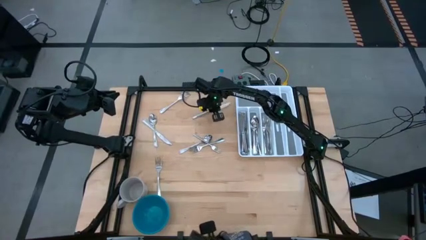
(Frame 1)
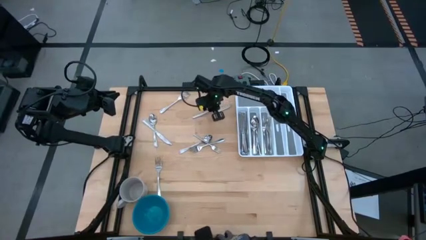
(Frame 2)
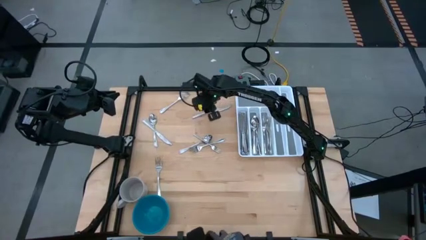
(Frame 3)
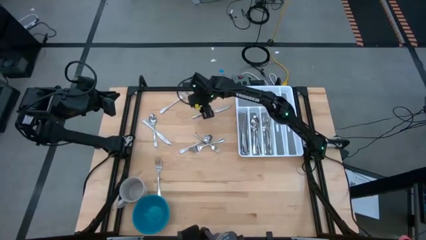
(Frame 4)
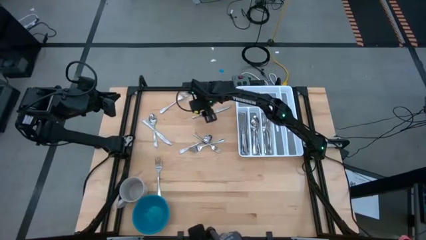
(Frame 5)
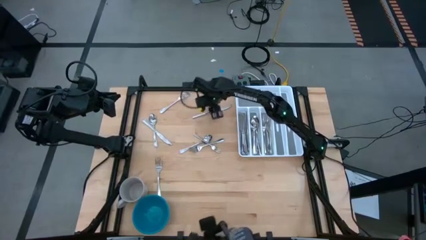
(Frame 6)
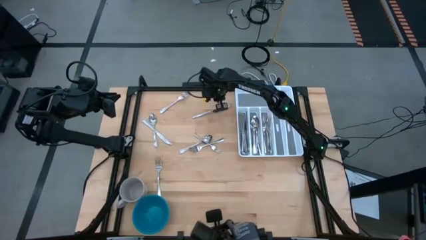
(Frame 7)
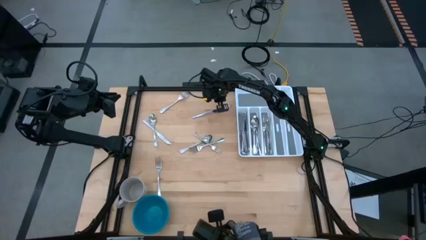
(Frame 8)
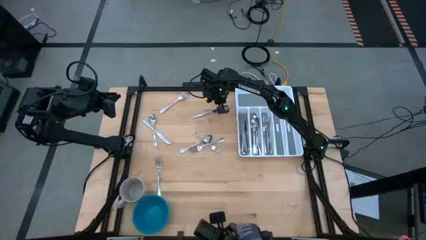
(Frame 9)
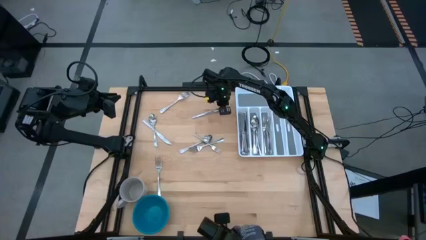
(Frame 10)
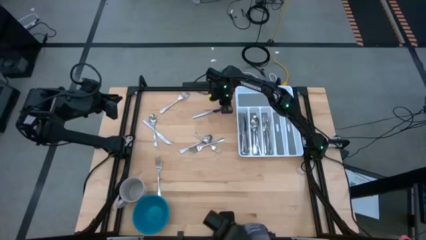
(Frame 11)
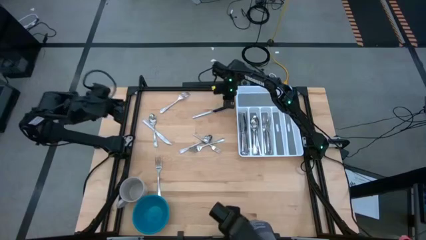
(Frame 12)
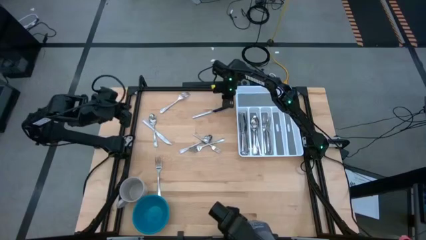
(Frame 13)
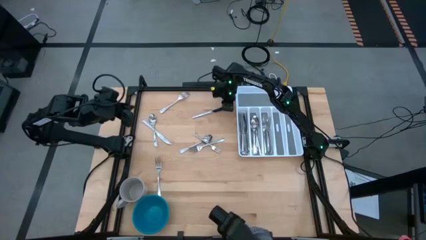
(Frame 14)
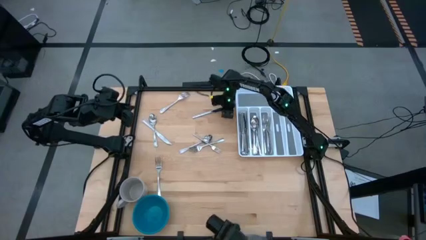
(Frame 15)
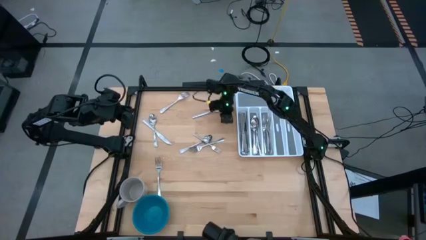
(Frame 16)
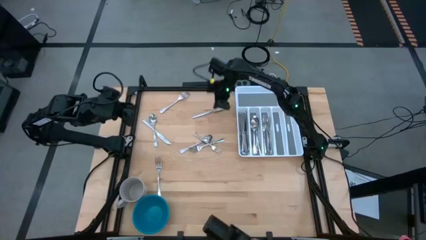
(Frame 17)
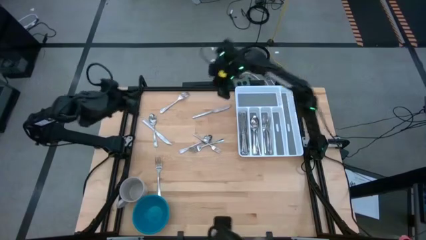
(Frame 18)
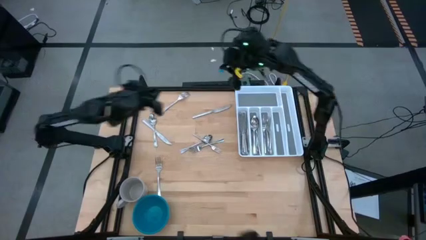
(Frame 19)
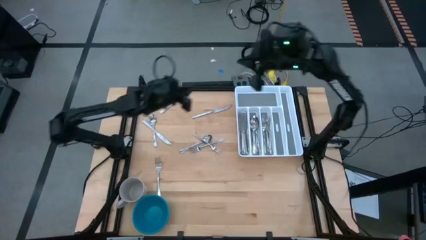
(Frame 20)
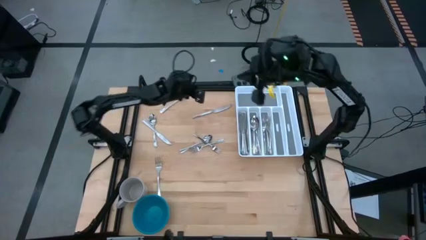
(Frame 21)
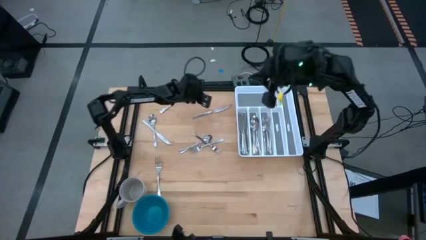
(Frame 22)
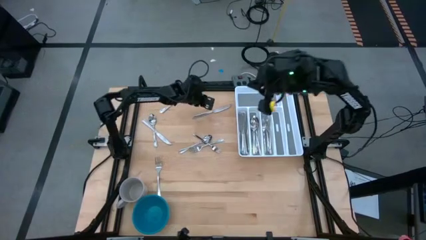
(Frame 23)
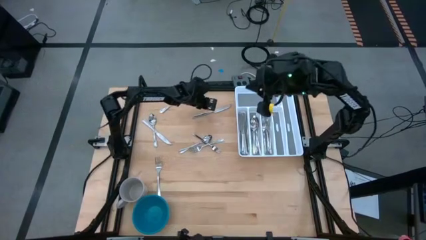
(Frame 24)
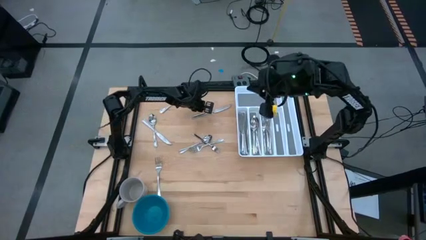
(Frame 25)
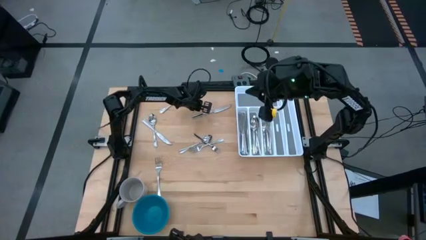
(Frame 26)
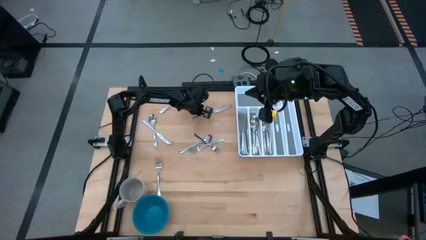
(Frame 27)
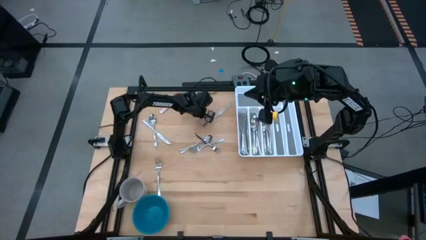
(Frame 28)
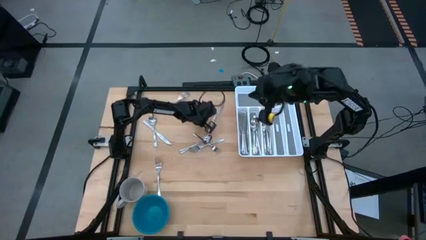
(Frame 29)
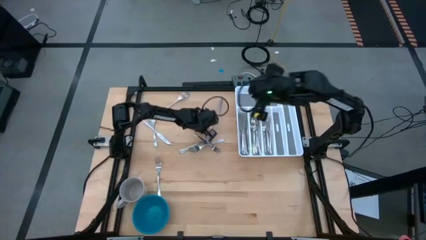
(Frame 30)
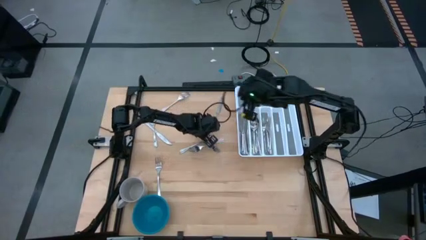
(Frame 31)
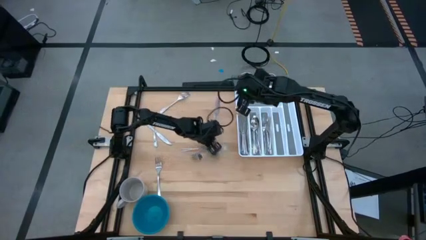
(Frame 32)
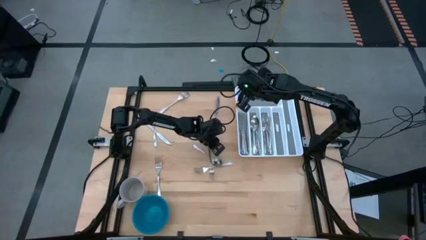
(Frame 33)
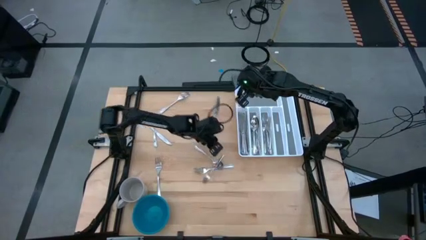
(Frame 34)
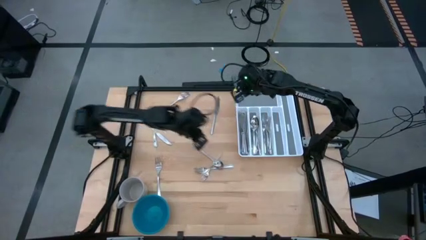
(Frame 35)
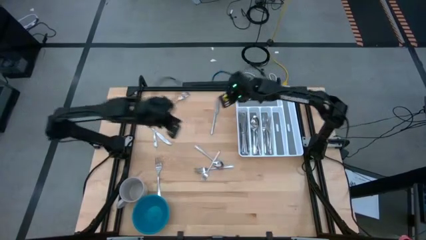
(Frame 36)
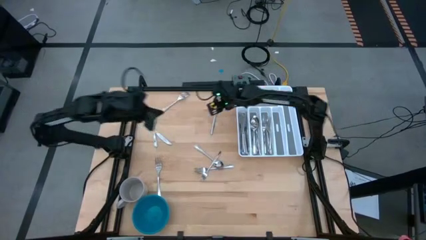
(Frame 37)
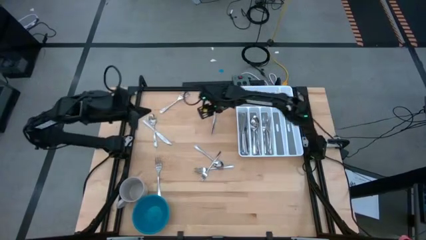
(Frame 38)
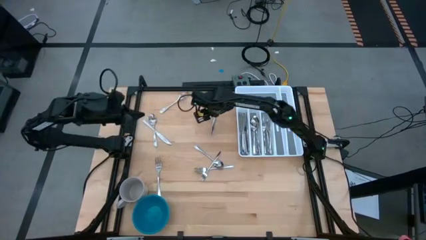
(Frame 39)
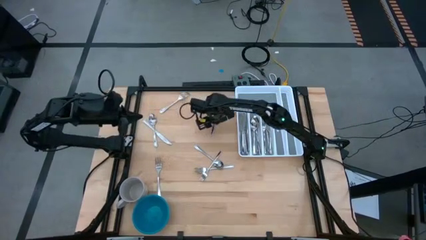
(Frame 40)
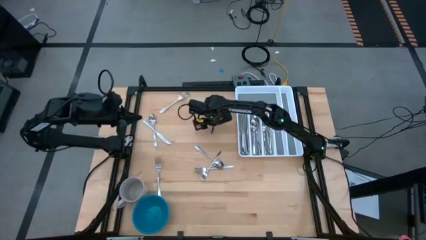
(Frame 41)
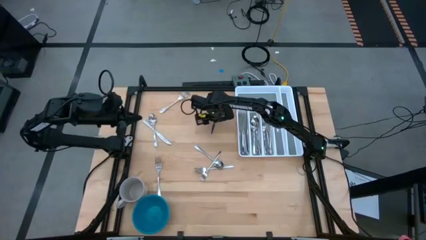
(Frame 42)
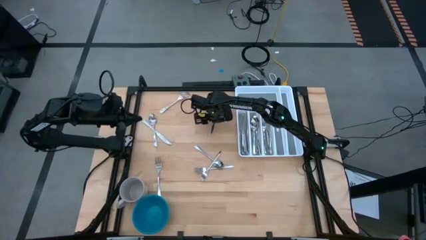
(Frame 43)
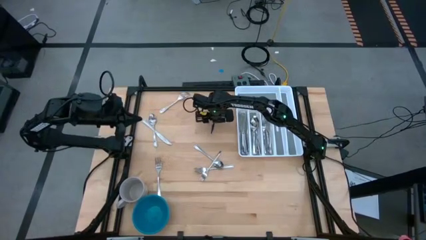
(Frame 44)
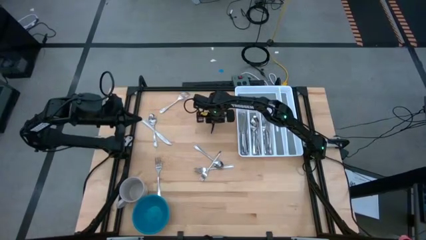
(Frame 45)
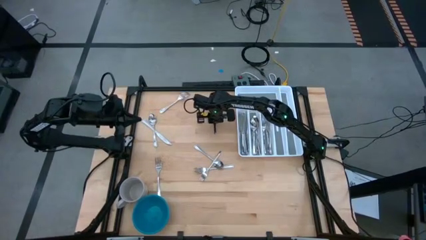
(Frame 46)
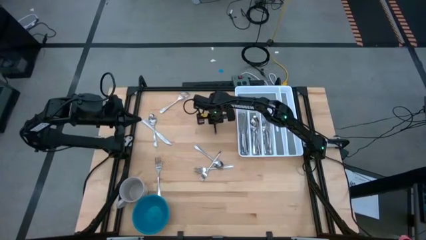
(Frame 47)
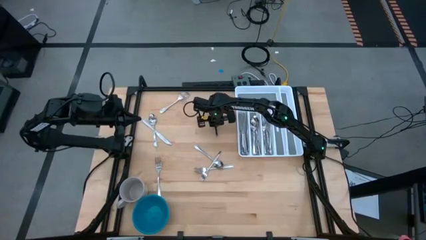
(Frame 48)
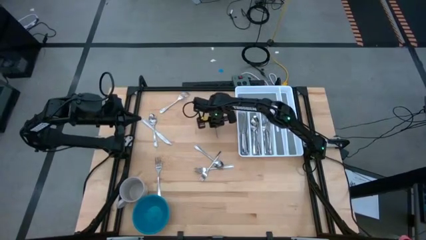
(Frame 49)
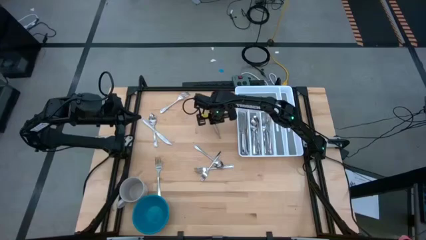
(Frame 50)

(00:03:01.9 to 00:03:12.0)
Task: Sort silverware
Put the table knife into the silverware tray

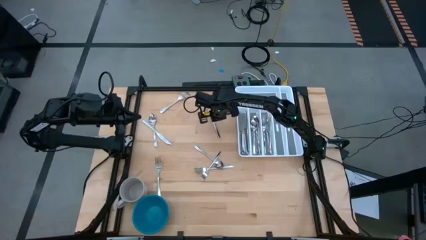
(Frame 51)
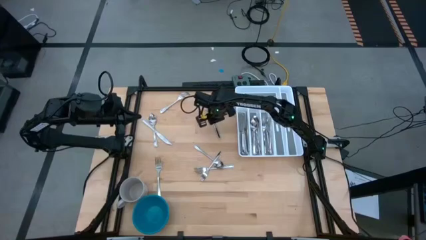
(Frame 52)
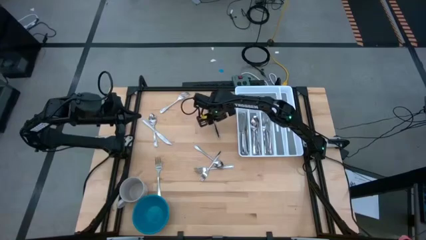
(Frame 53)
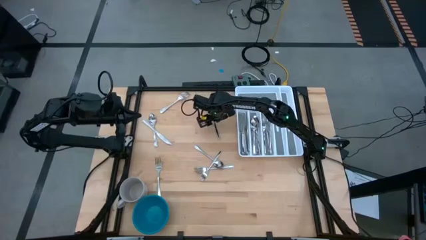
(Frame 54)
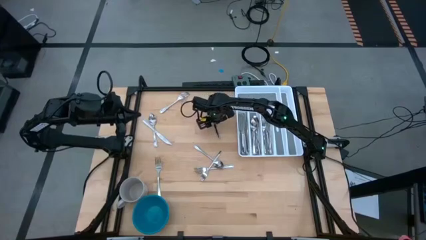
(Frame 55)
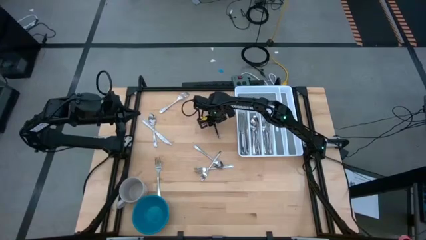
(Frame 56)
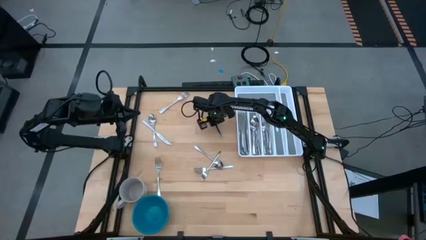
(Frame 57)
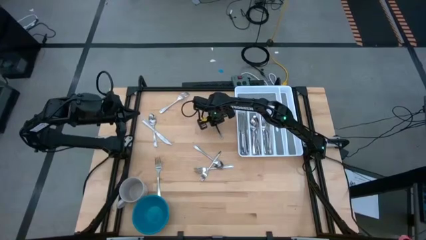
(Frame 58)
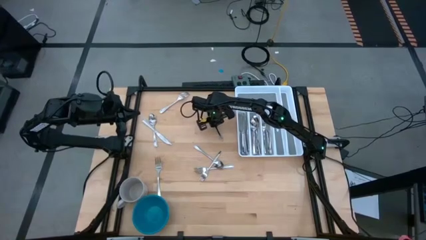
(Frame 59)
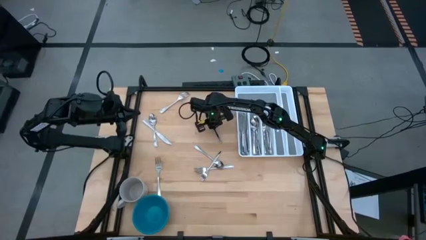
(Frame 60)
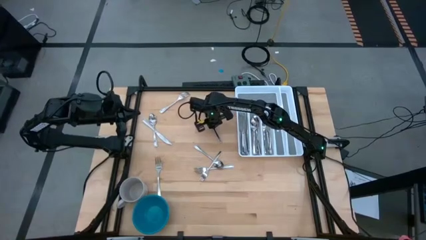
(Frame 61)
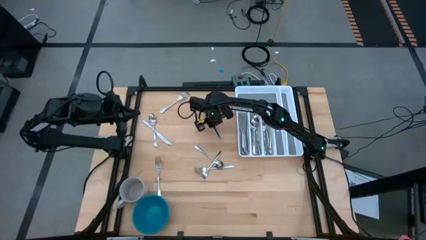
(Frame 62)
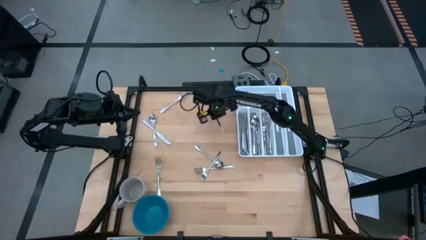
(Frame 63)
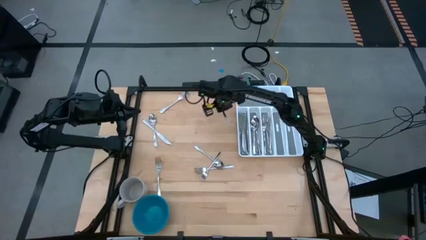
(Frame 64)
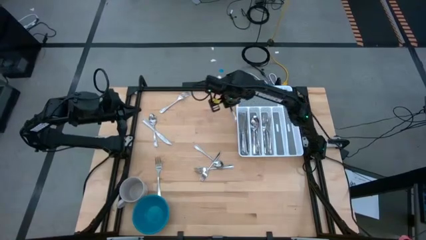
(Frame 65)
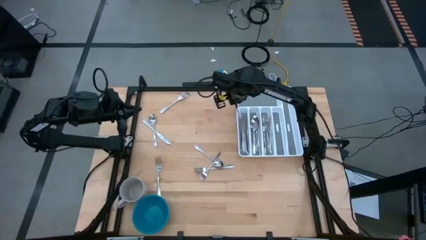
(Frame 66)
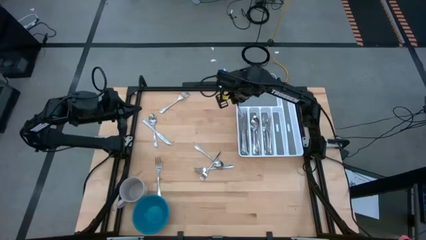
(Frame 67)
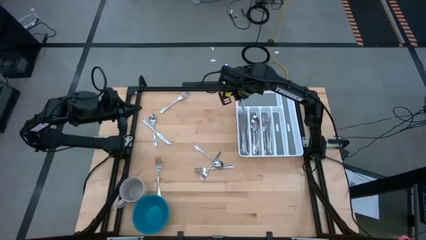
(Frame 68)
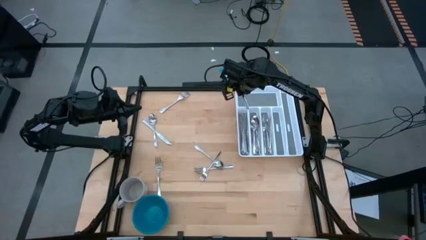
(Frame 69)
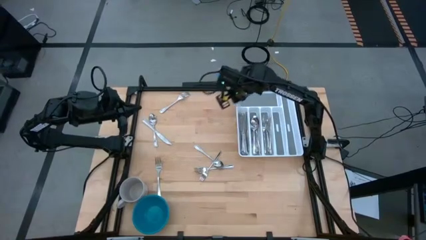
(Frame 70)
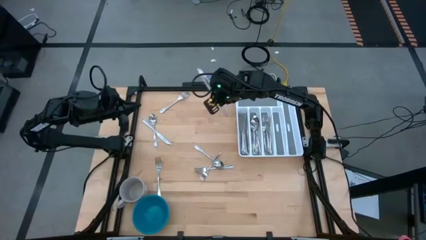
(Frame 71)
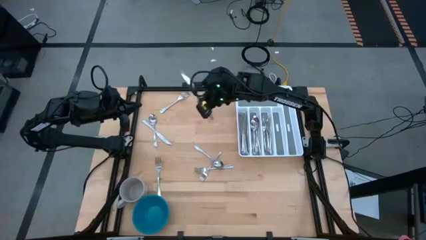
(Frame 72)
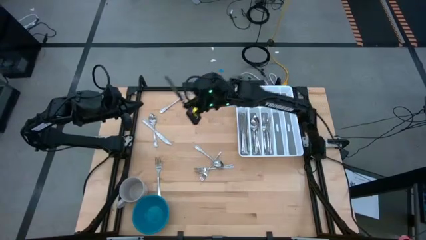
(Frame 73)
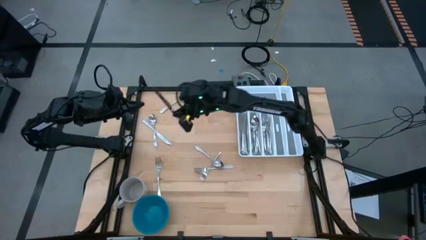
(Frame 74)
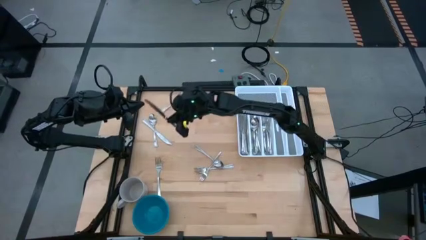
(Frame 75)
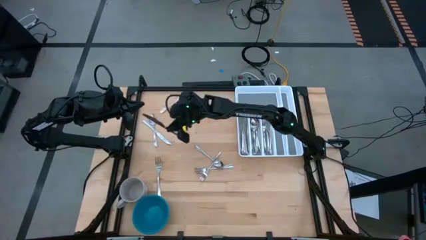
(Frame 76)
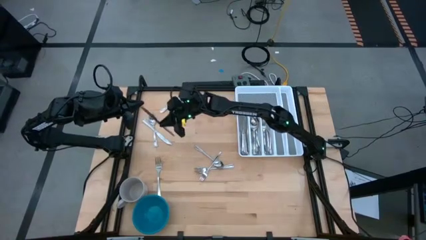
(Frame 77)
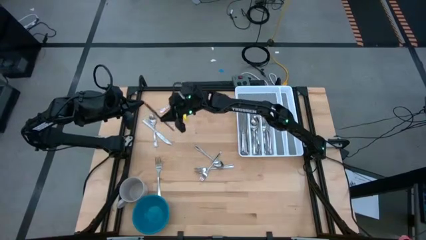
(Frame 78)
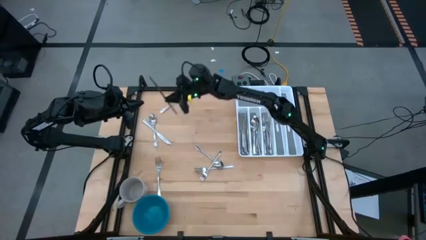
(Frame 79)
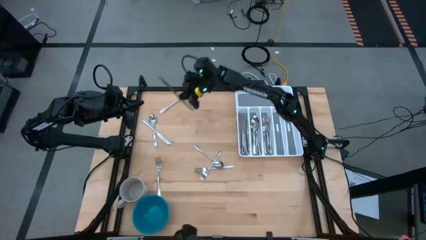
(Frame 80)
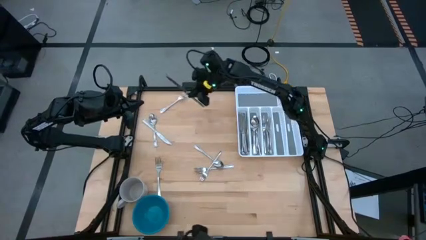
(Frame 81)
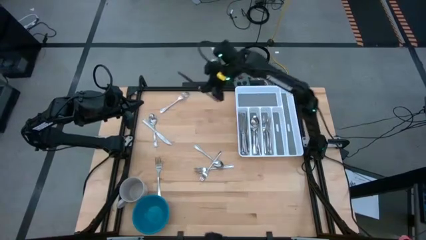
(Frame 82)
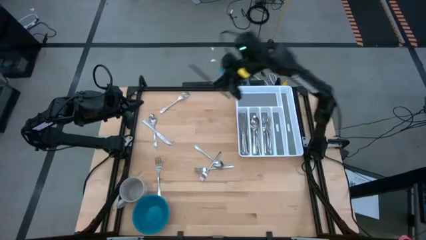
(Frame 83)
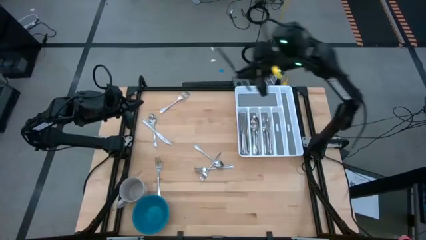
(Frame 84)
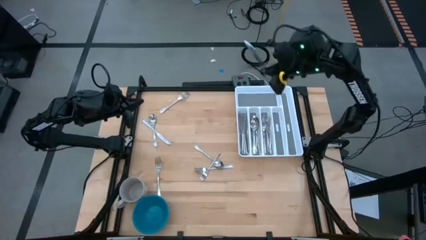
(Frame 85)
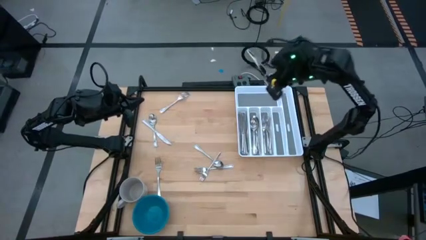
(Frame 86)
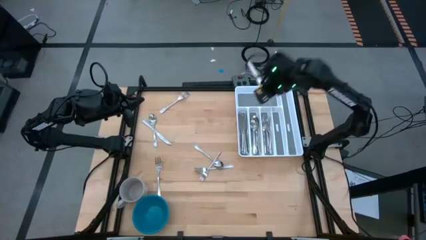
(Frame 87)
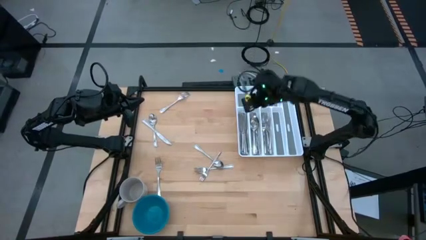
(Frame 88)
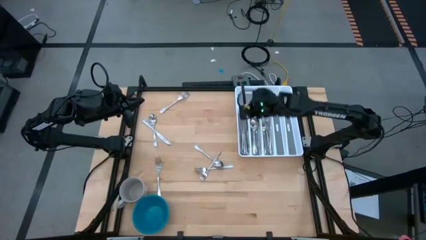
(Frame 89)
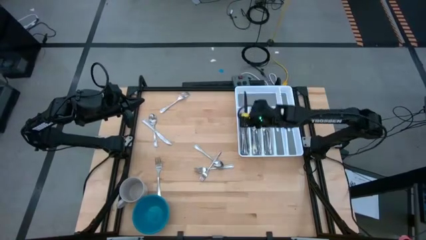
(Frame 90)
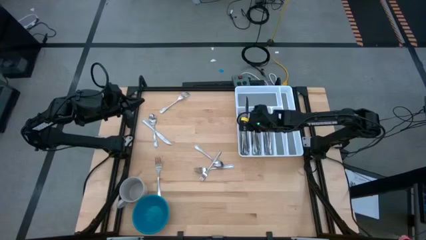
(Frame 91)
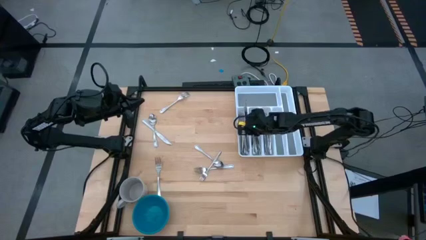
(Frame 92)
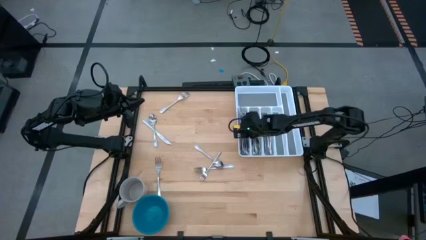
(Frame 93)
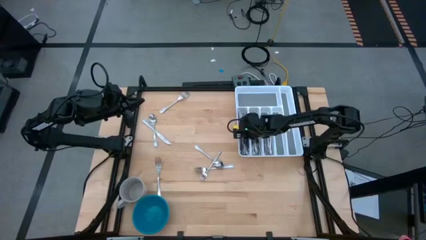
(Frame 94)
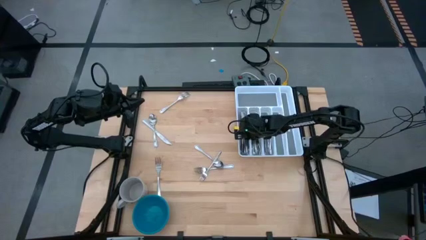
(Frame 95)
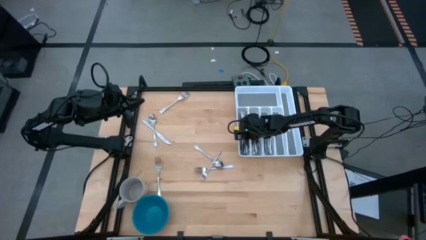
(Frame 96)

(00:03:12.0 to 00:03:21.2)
Put the table knife into the silverware tray
